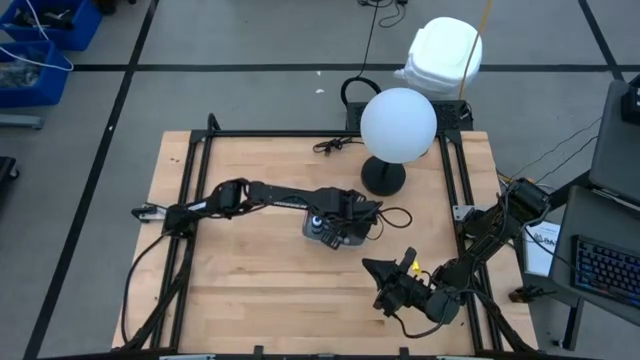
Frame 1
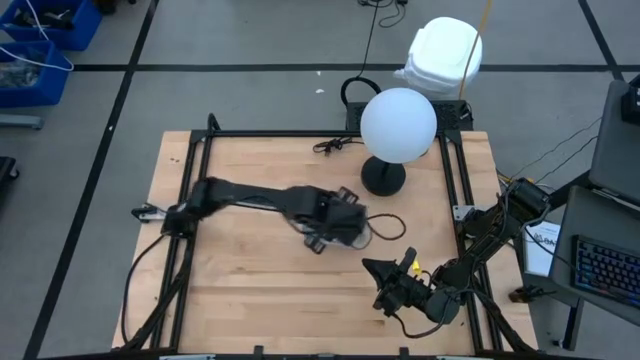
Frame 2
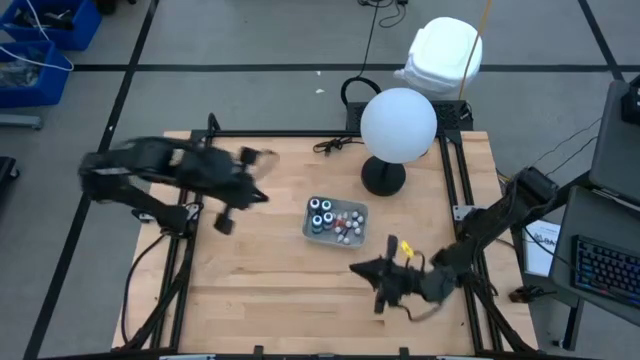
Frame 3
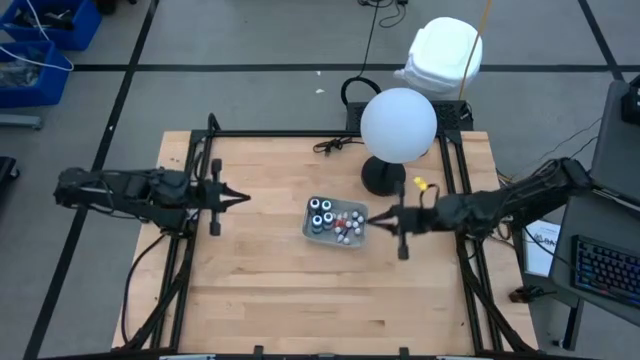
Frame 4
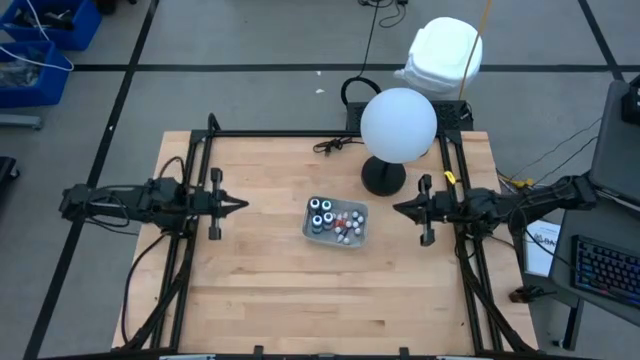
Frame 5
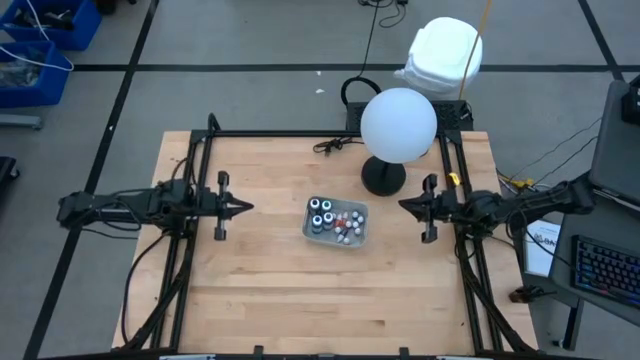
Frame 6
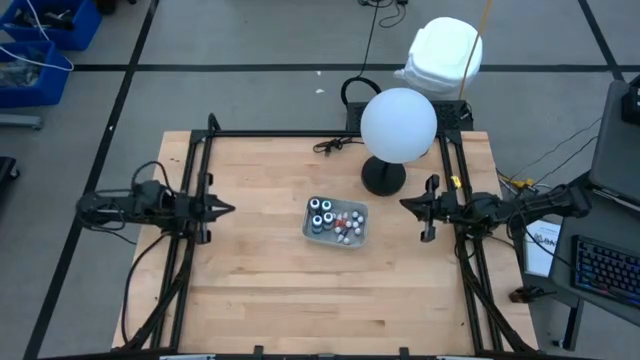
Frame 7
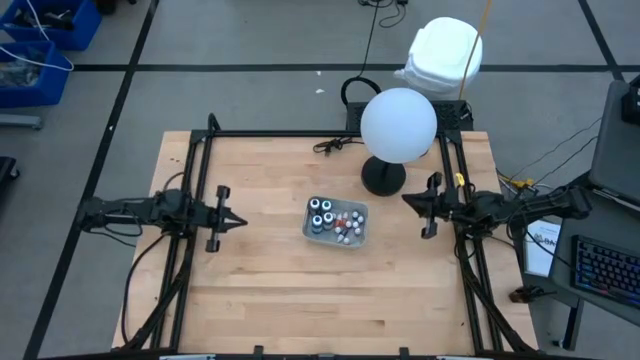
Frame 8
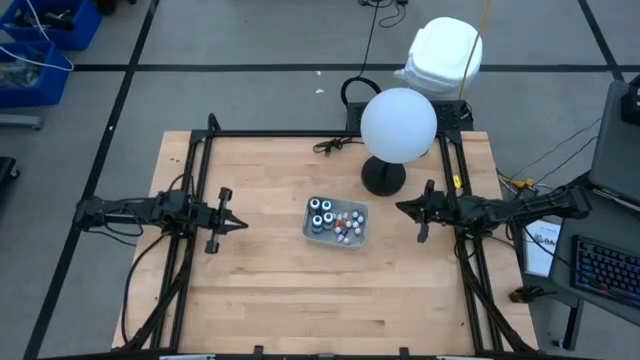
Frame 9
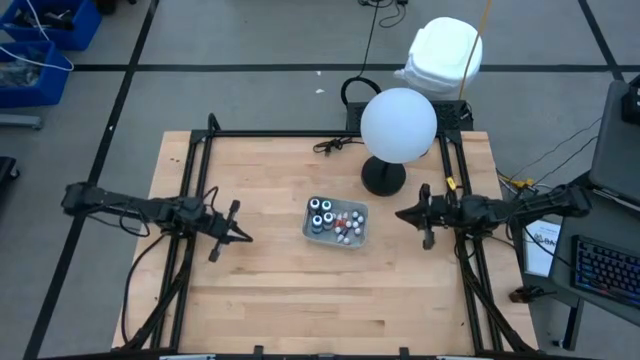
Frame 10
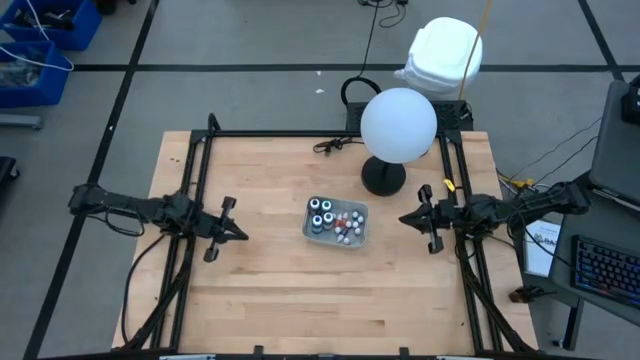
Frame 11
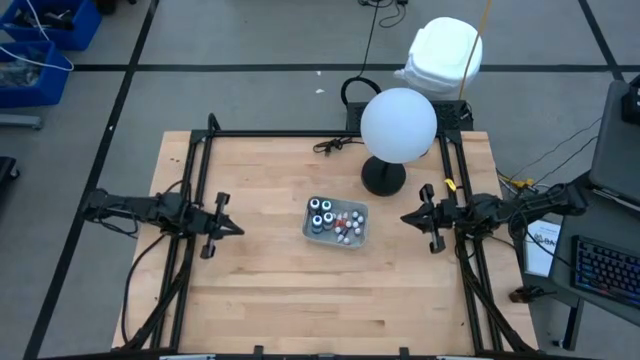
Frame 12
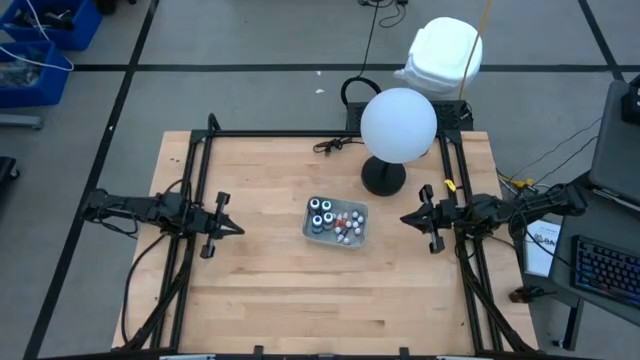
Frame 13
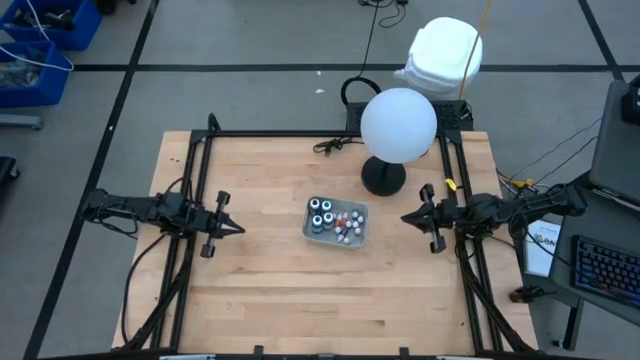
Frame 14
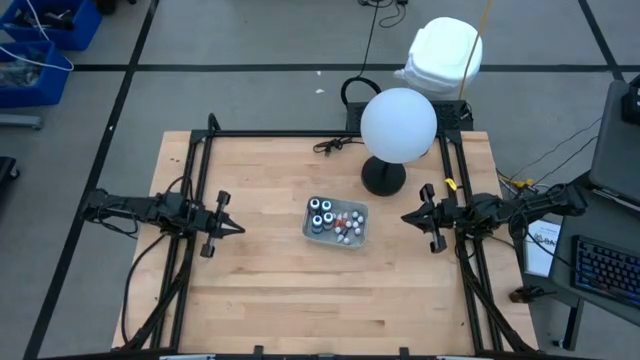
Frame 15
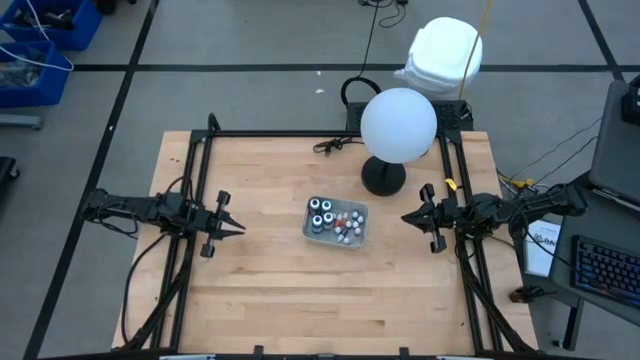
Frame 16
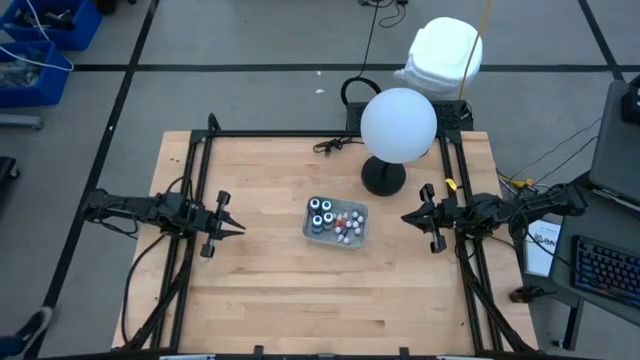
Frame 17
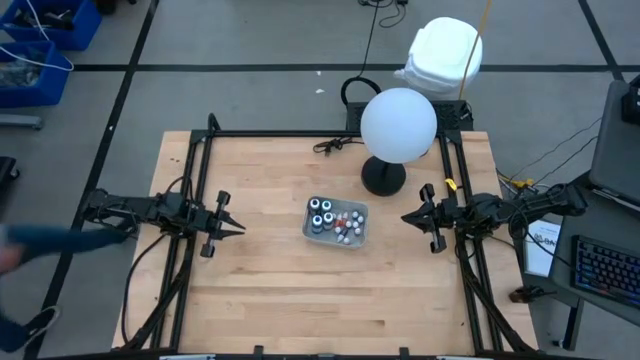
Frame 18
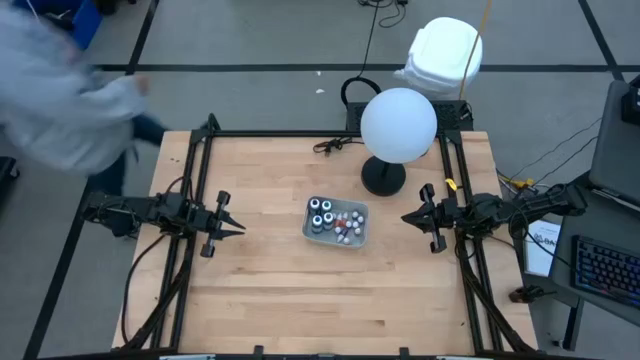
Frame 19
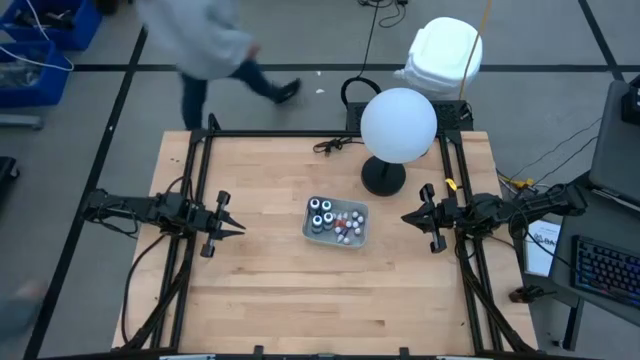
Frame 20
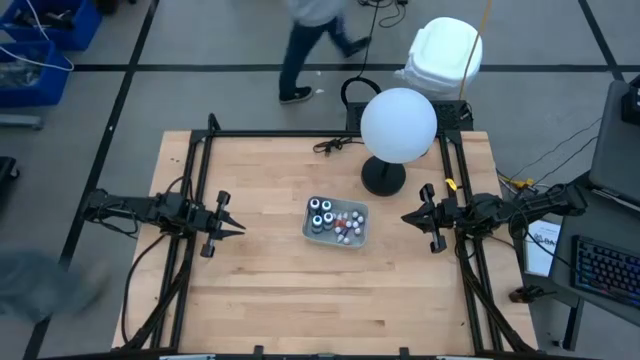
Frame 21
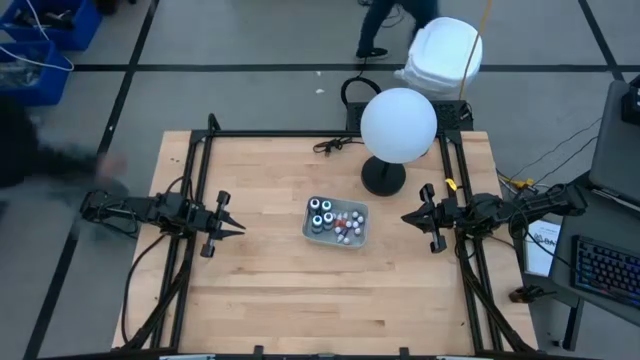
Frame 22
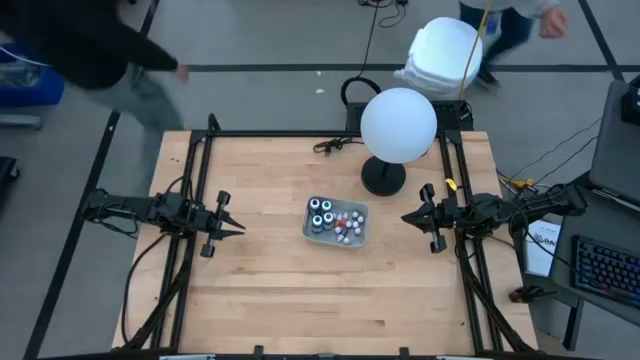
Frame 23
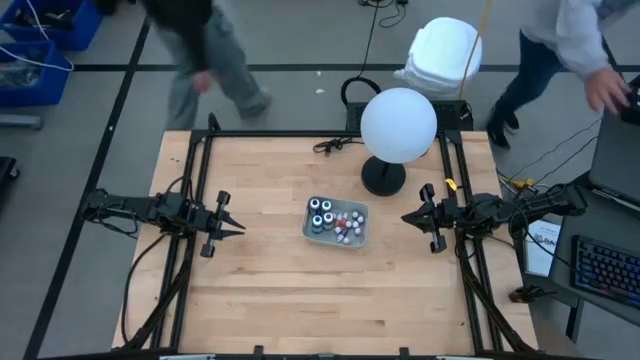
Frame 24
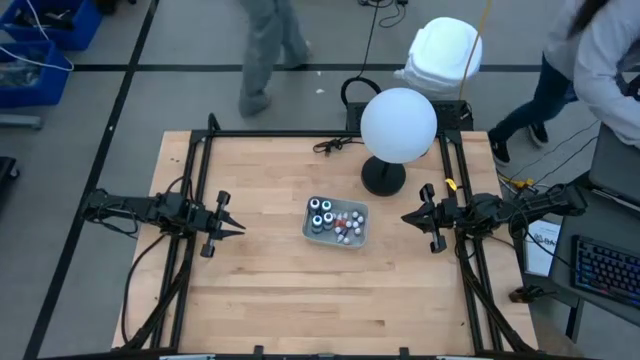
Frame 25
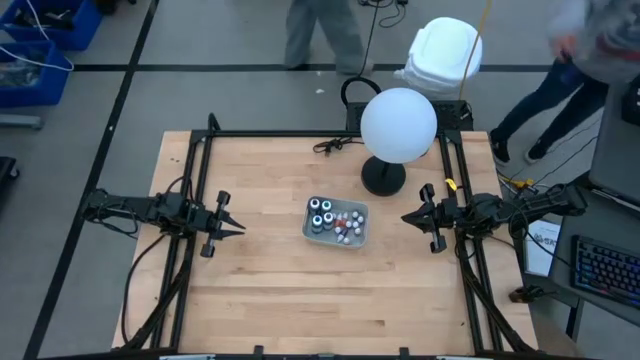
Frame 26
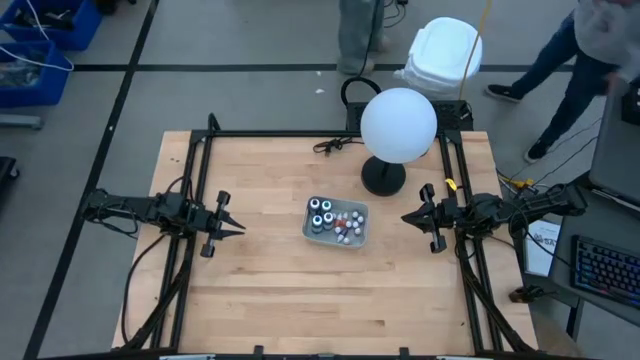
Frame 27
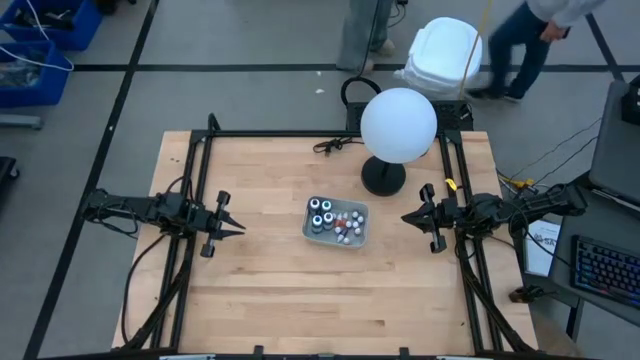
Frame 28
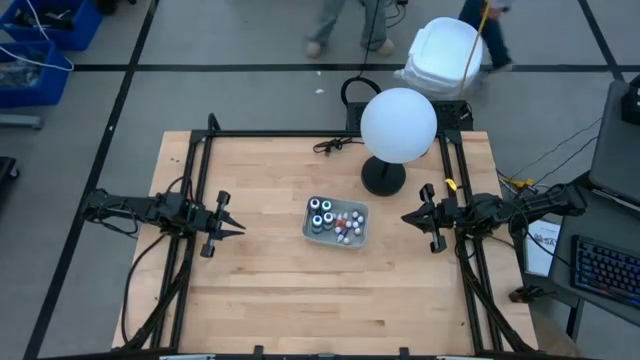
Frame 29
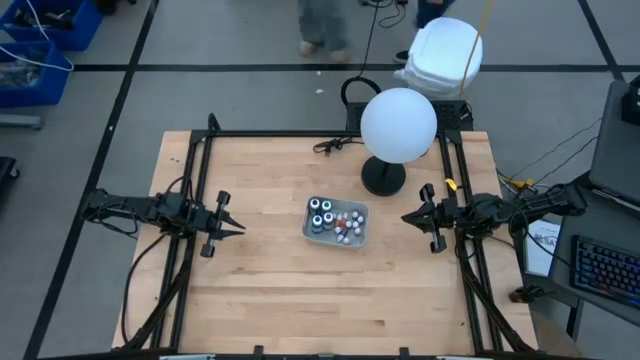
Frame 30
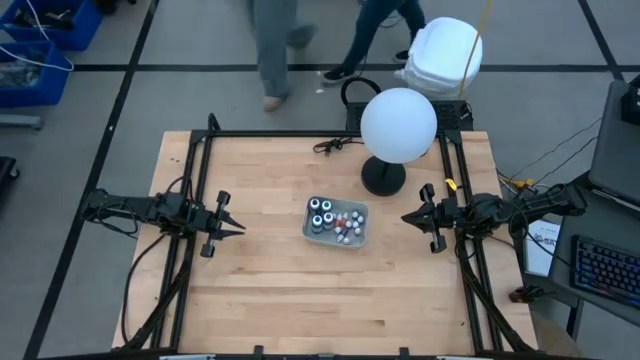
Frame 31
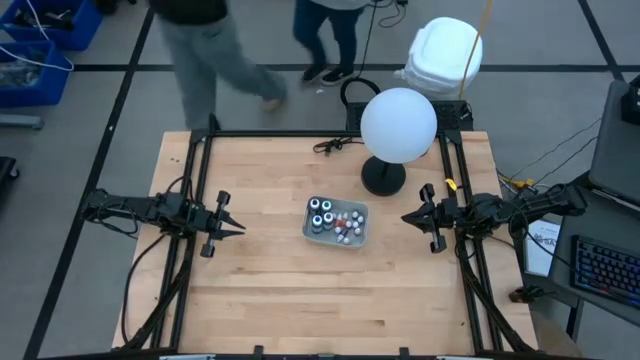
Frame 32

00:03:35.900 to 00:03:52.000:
Task: Pick & Place food coloring
Return to Home Position

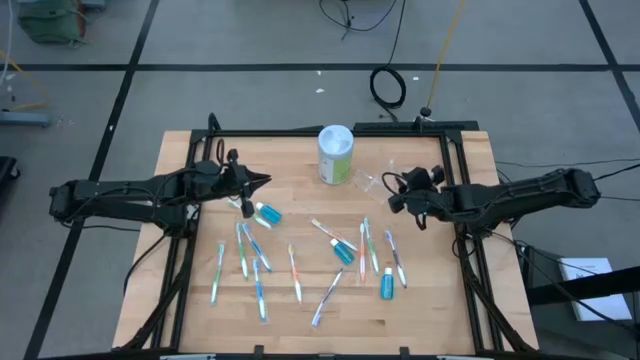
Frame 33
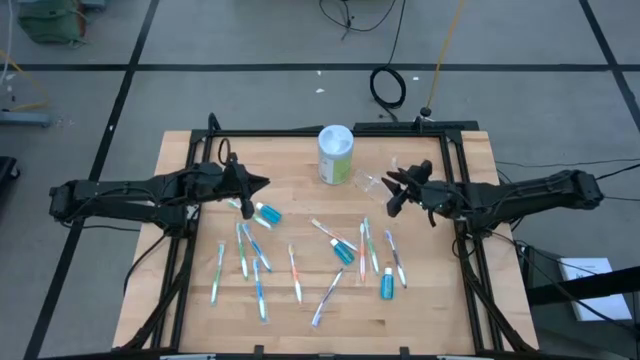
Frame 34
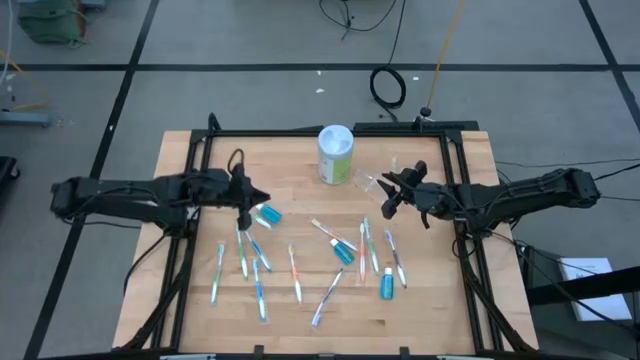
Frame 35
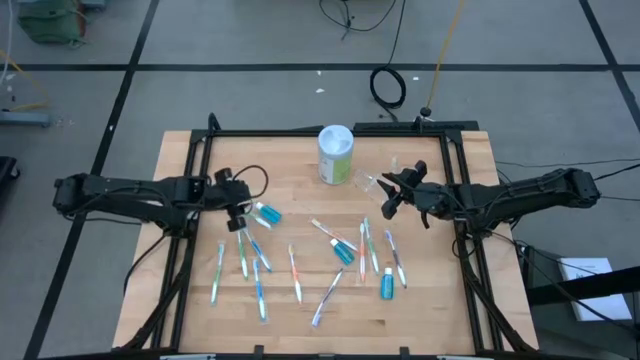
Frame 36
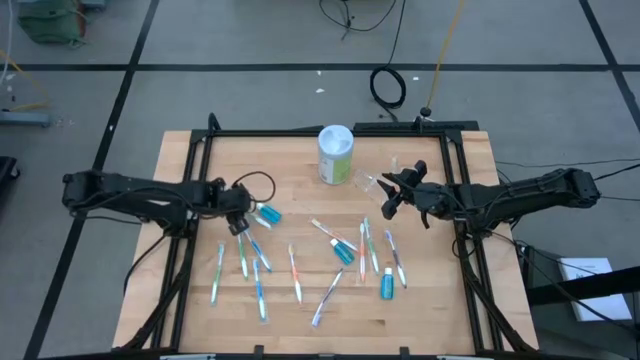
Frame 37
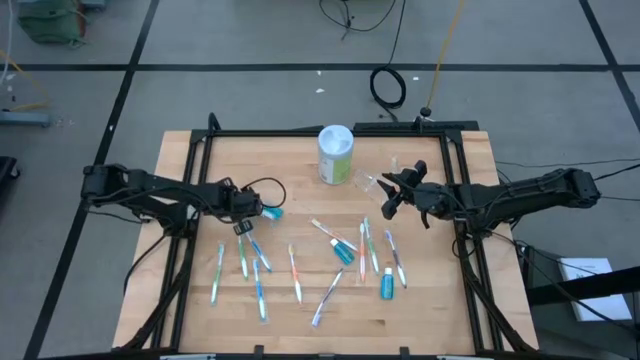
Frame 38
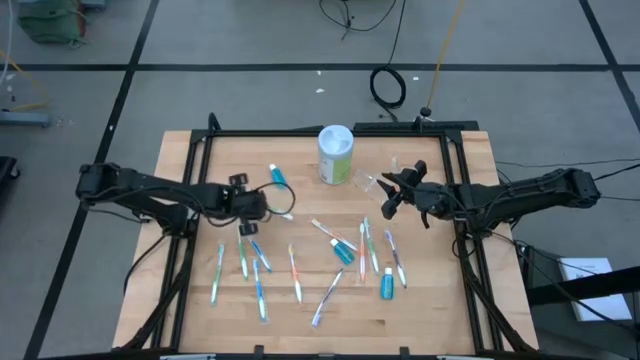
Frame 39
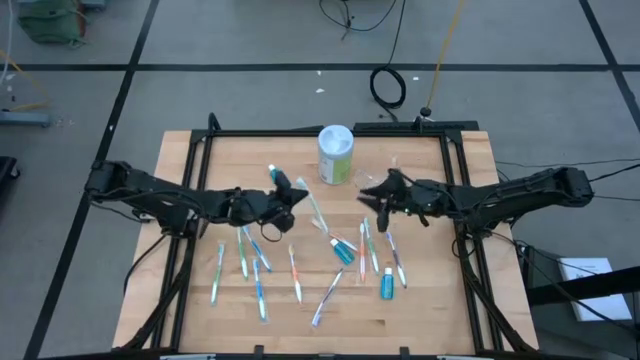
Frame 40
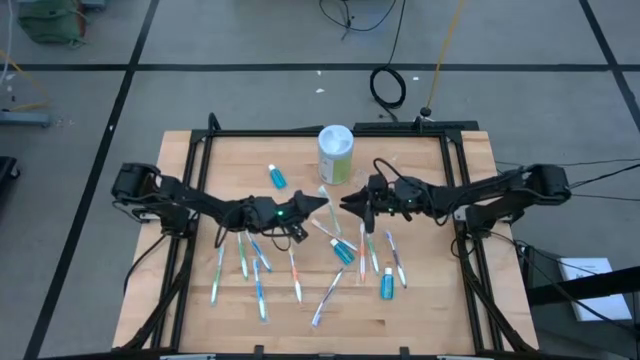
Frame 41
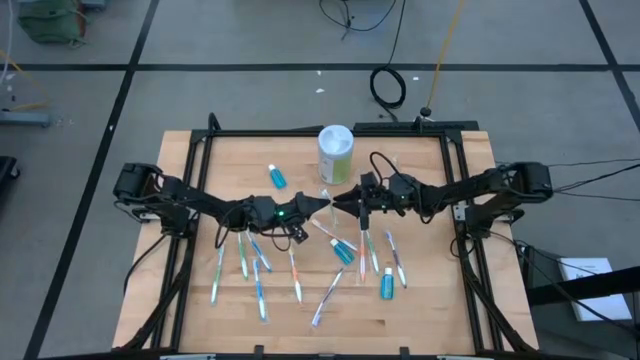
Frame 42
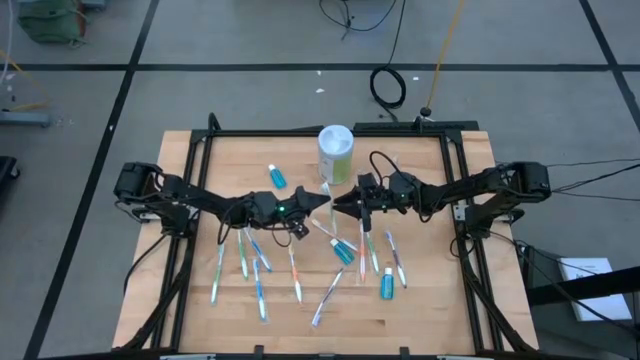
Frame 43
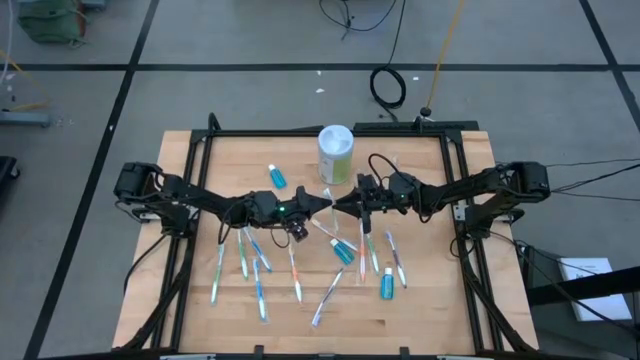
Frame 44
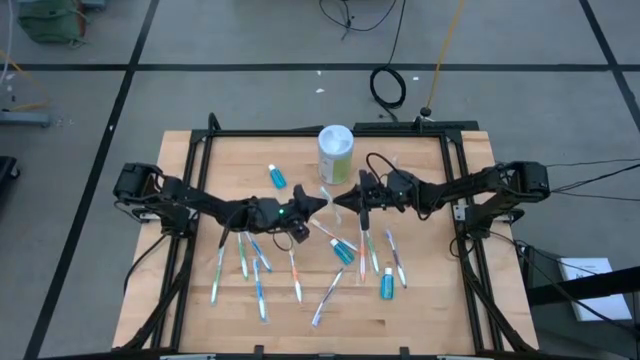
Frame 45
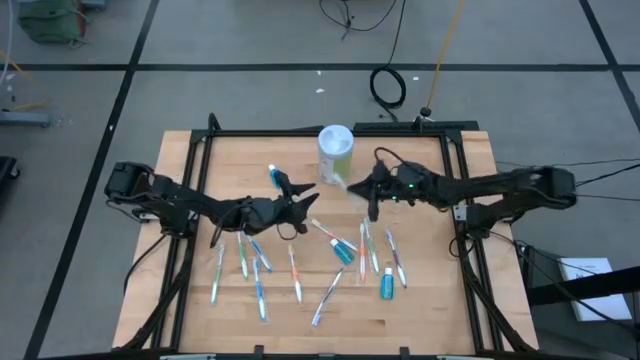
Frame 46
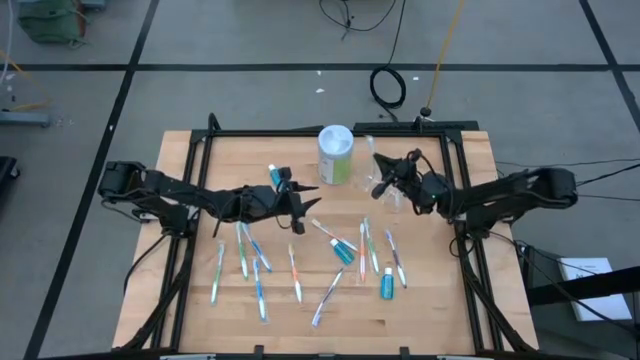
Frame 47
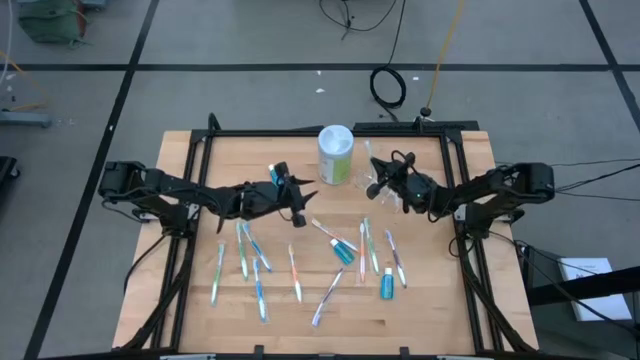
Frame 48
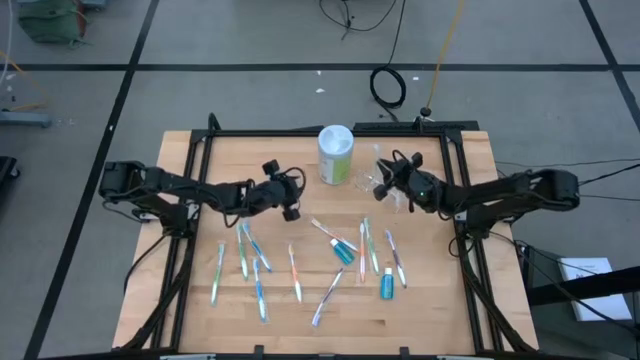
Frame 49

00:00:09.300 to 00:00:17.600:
Task: Pick & Place toothbrushing station
Put the green toothbrush into the transparent organizer
